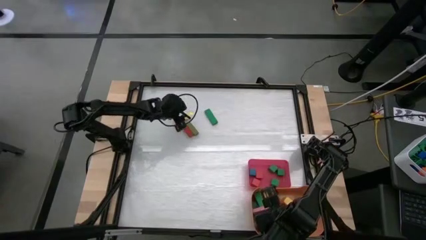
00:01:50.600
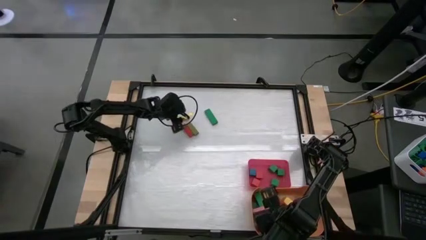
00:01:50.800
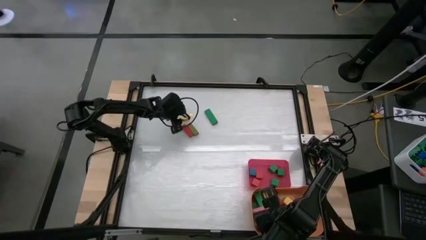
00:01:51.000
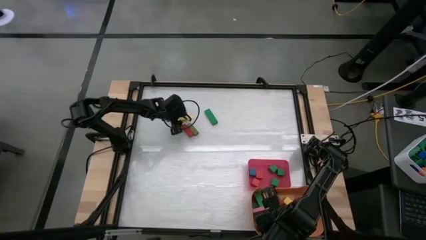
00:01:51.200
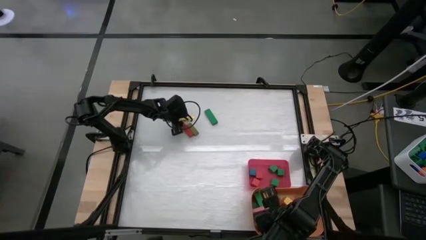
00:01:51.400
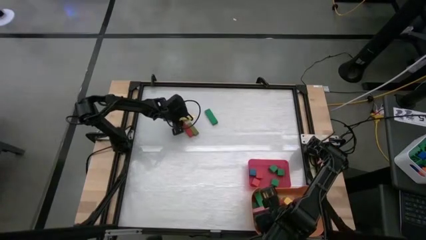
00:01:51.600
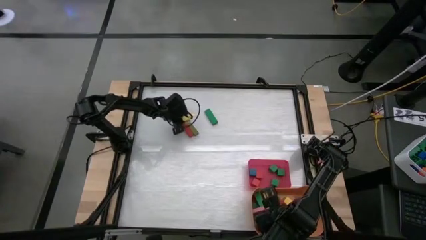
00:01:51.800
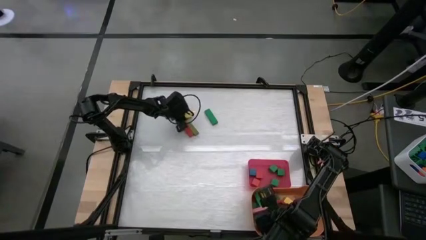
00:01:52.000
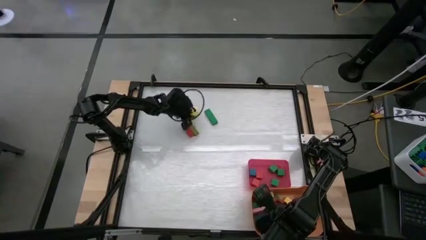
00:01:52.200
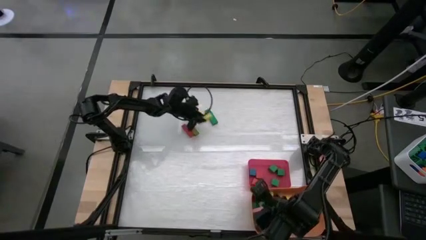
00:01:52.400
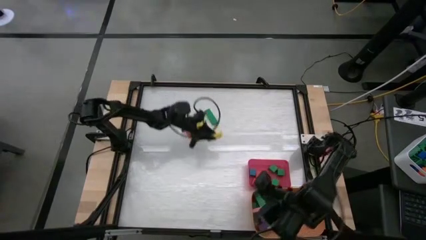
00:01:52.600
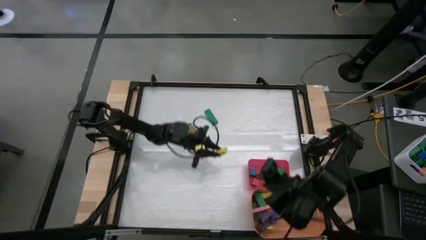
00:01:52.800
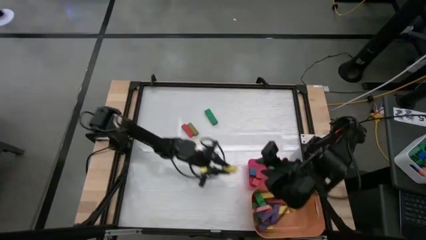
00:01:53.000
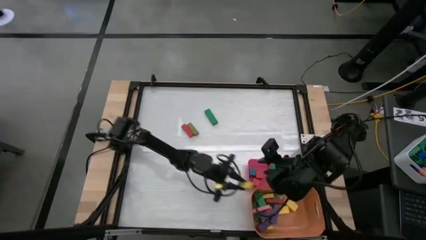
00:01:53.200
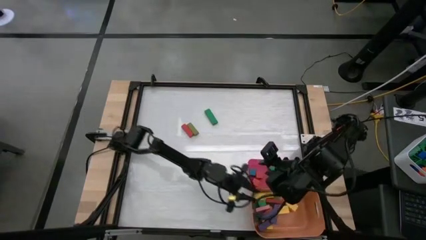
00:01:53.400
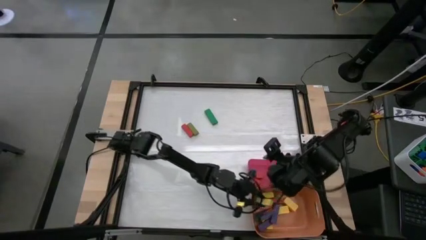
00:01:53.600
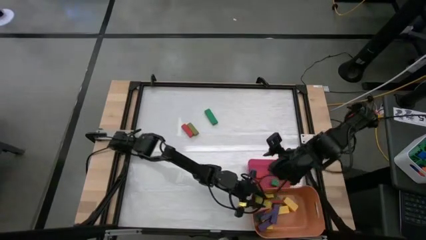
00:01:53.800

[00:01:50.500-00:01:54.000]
Task: Sort blocks by size
Put the yellow rectangle block into the orange bin

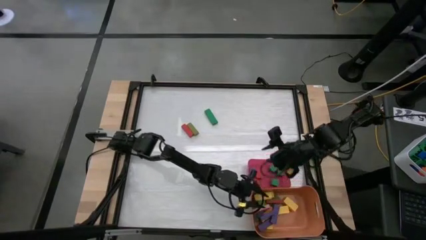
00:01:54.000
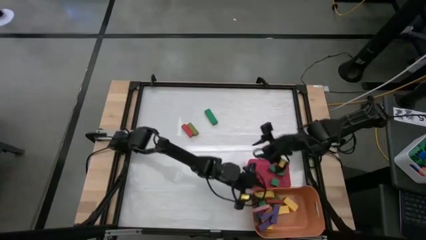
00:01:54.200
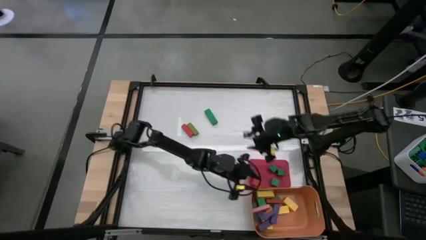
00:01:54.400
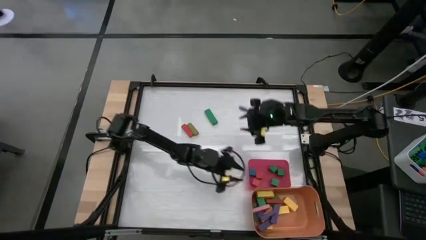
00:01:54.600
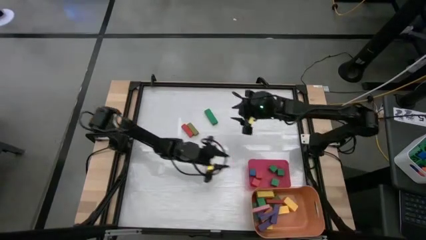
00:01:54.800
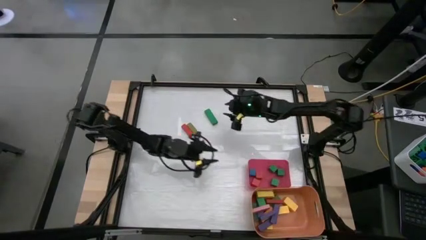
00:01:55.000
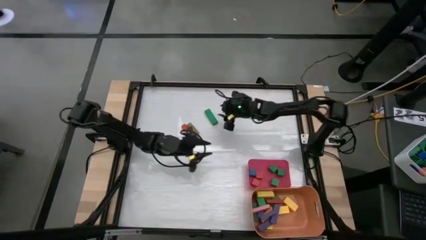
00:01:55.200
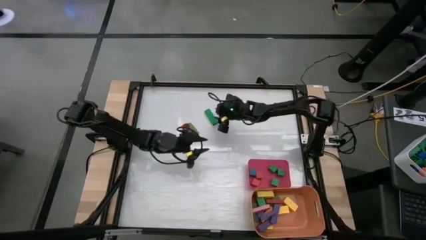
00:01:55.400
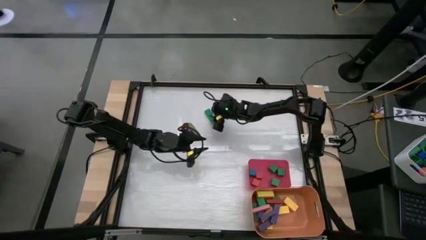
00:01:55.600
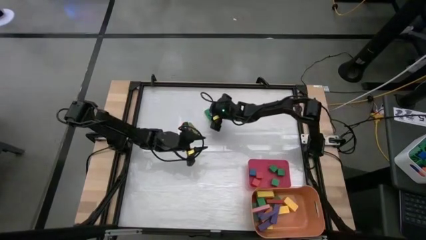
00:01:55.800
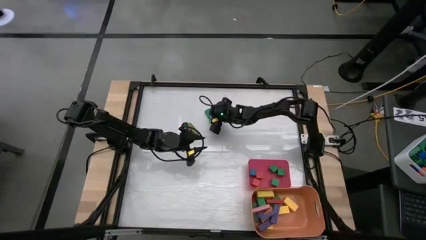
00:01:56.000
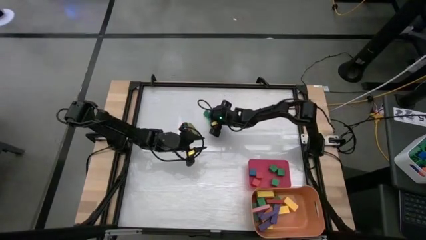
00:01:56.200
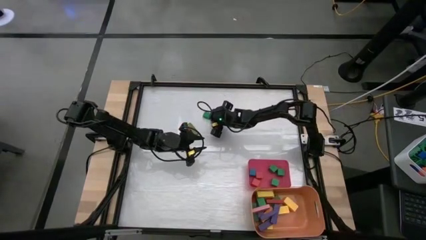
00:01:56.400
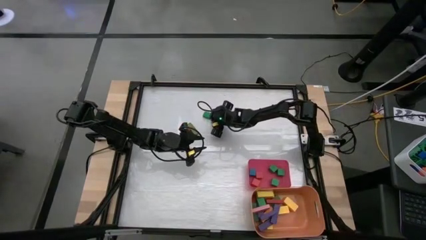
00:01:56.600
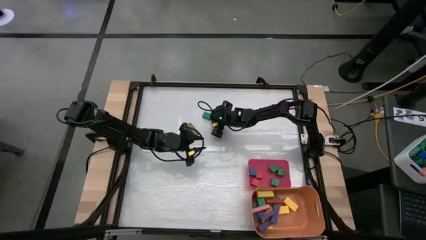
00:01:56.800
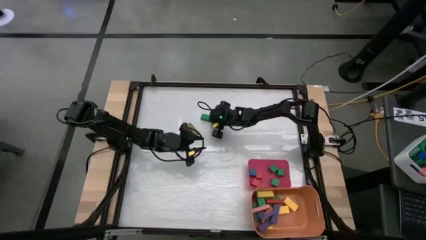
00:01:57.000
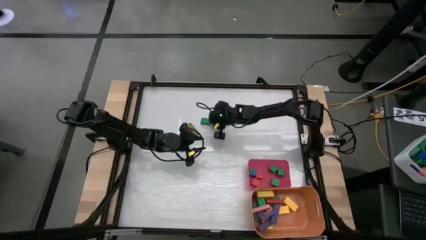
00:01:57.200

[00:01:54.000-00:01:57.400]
Put the green rectangle block into the orange bin

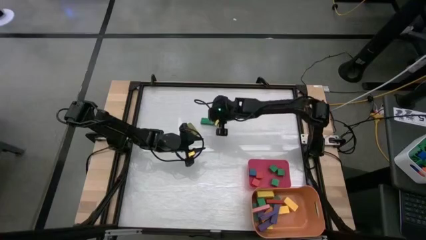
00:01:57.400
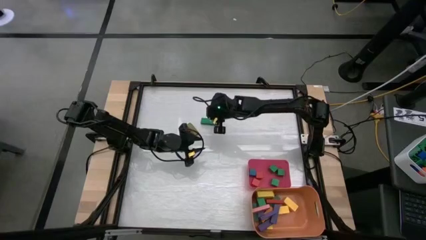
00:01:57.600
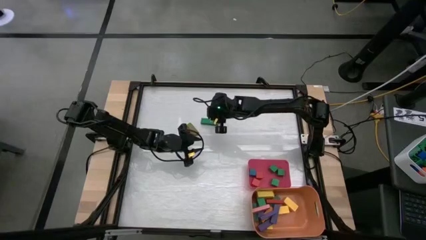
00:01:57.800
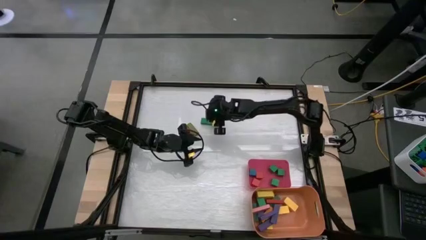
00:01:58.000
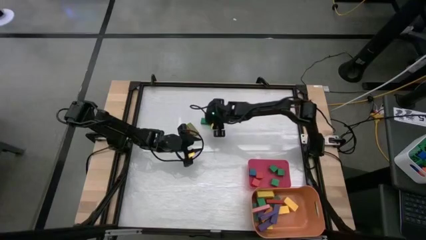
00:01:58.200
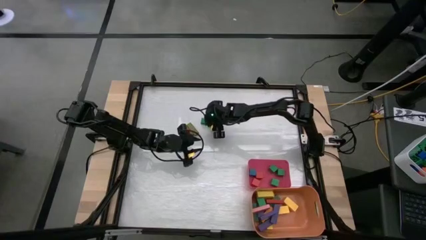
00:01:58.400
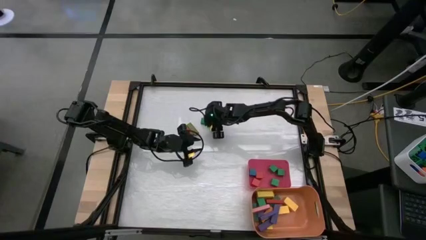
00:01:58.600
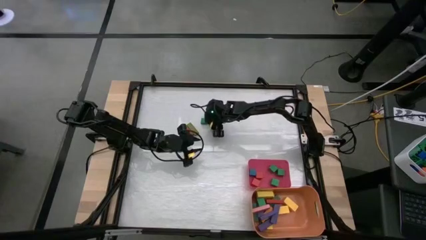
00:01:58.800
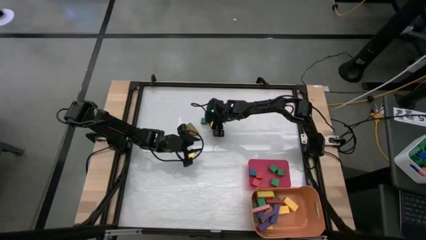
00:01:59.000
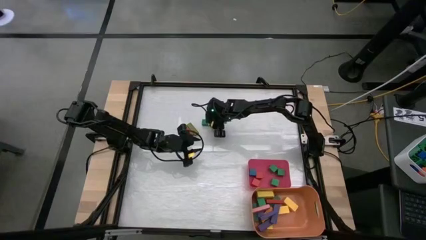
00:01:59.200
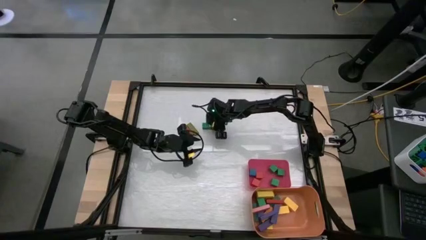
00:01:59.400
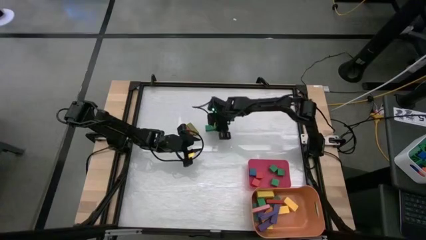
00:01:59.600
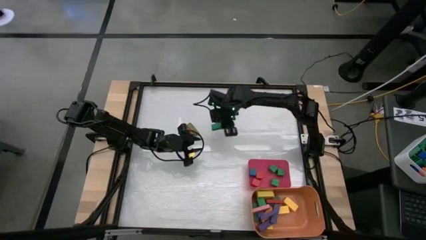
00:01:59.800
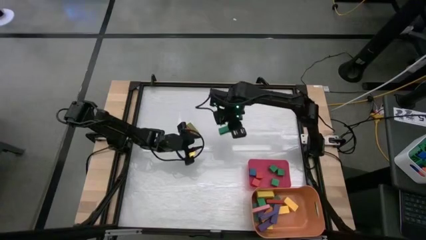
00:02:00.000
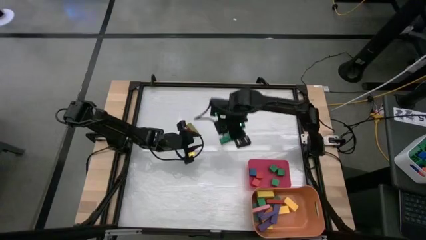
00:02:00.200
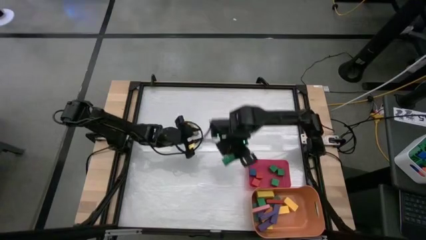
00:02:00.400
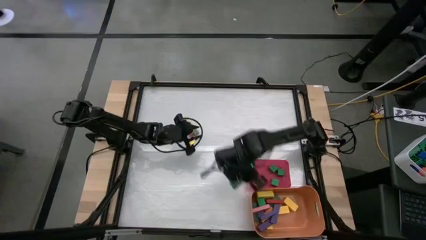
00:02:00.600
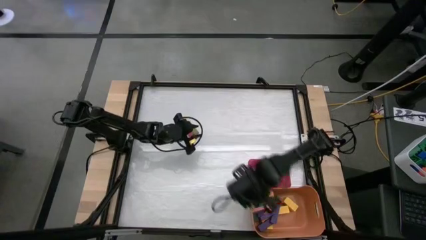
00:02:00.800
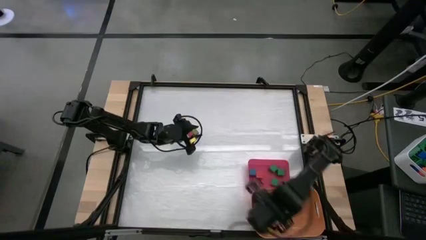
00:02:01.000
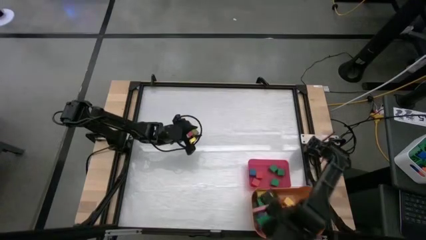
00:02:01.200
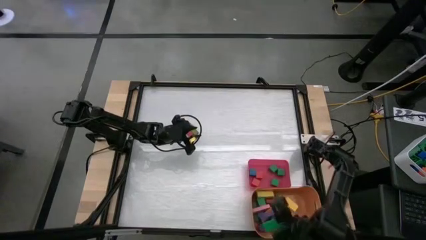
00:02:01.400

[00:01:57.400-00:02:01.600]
Put the green rectangle block into the orange bin

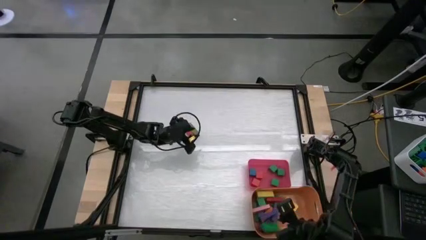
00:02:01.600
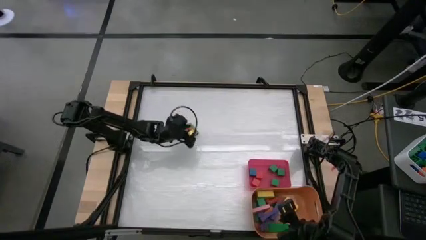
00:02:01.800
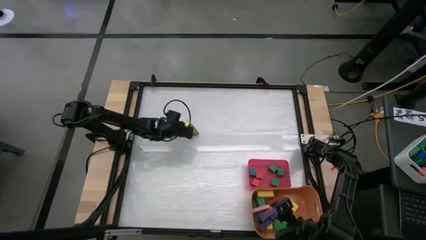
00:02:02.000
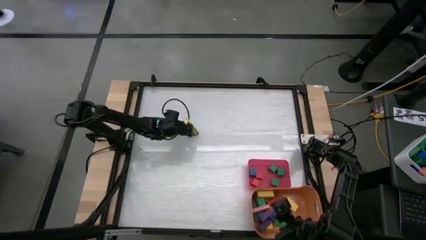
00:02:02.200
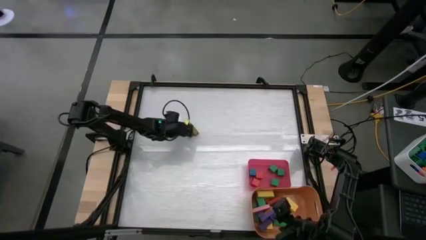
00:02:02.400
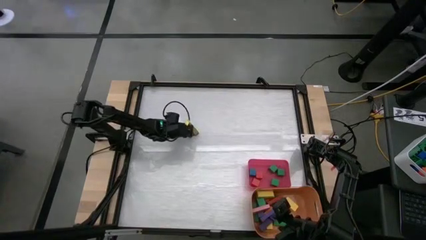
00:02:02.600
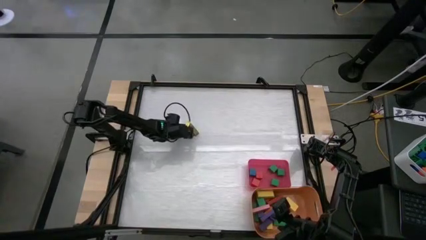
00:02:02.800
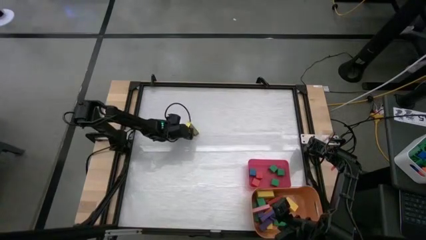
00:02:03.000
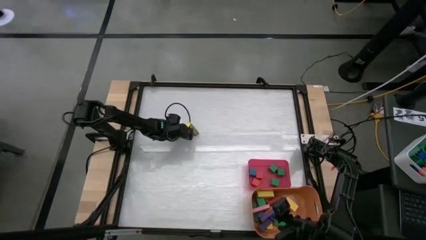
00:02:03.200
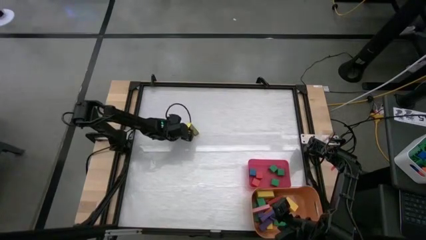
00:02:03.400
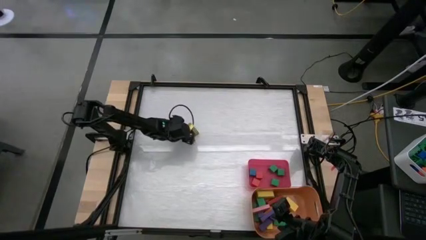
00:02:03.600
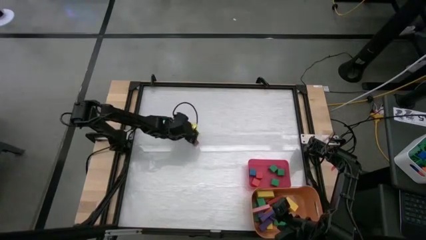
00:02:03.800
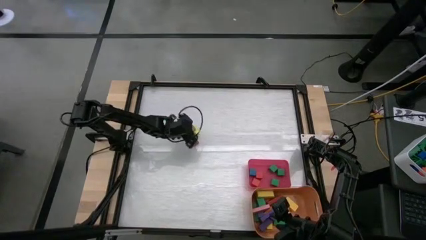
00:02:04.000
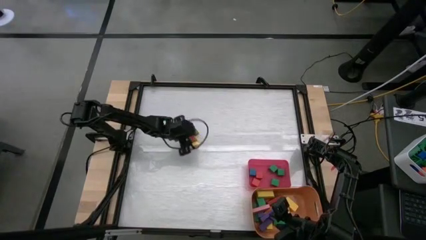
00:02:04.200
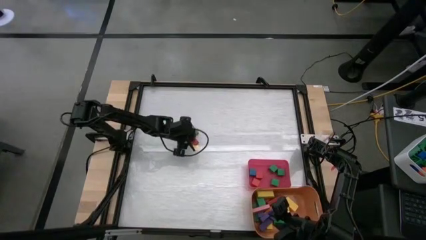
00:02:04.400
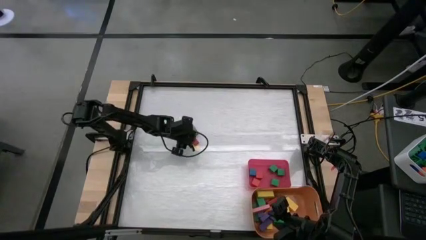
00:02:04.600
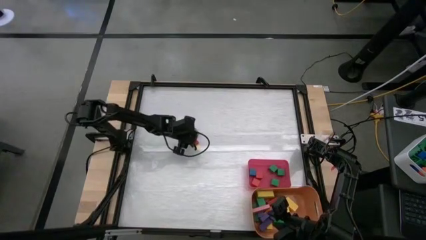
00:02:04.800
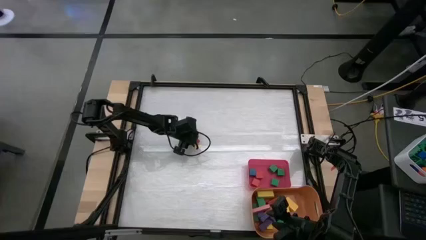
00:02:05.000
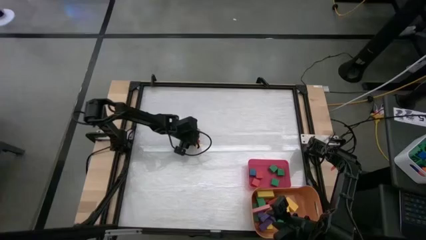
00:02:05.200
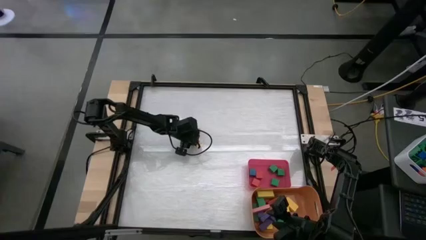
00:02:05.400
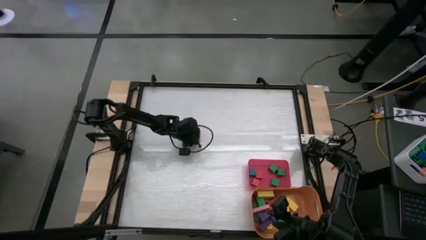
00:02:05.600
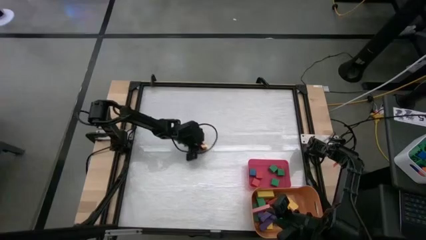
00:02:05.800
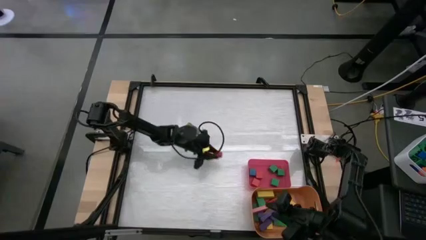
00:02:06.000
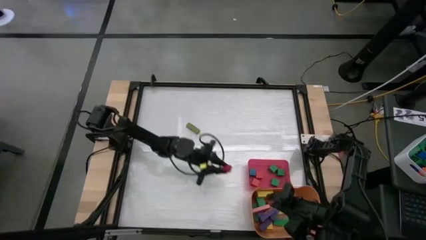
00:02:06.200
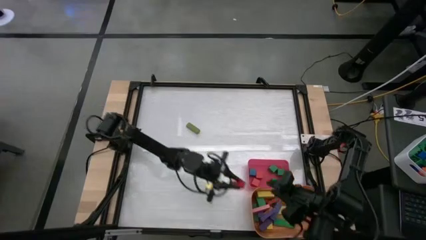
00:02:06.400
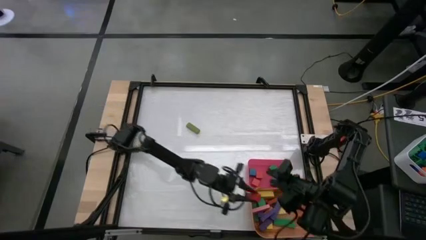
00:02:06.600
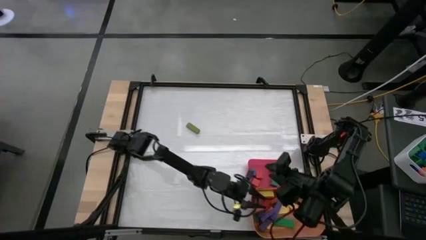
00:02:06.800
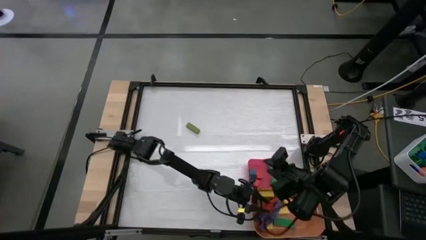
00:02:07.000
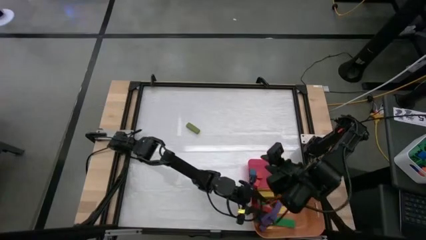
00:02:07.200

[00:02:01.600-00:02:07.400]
Put the orange rectangle block into the orange bin

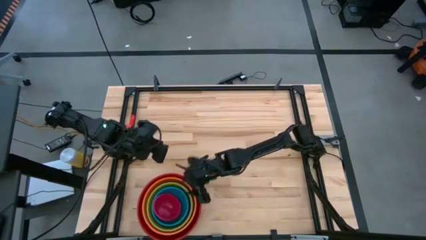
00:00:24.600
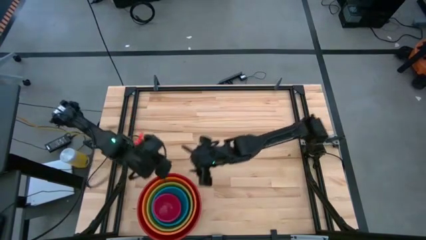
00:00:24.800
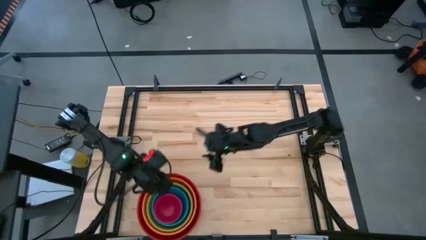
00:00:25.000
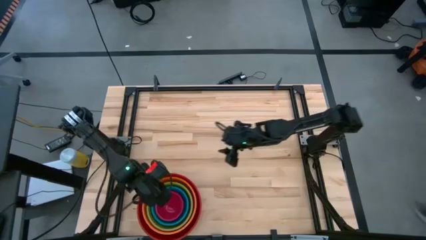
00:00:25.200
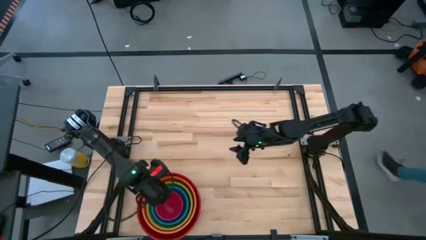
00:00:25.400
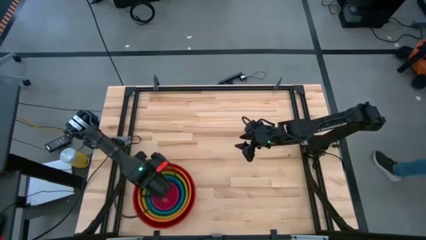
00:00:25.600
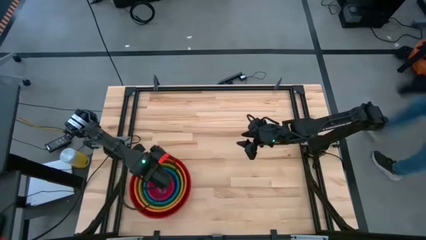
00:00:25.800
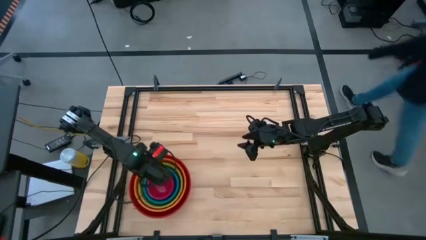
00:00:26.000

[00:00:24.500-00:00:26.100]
Task: Nest bowls inside each other by size order
Adjust the stacked bowls
